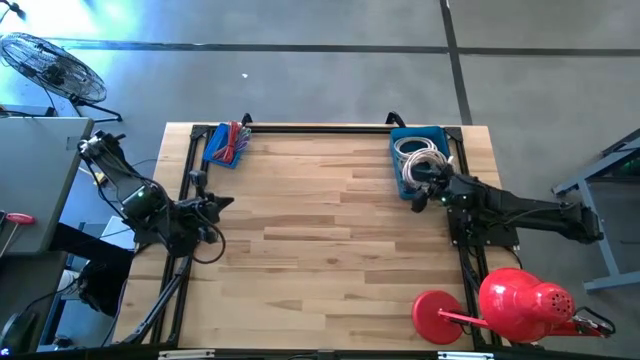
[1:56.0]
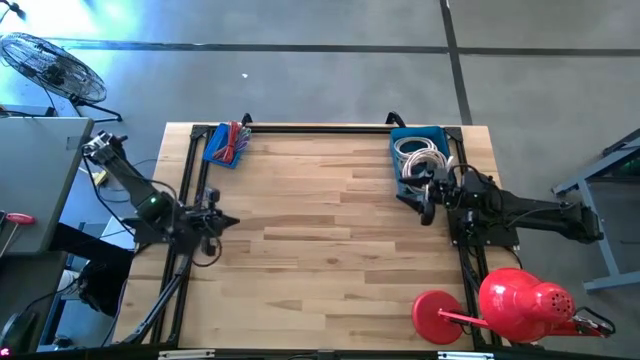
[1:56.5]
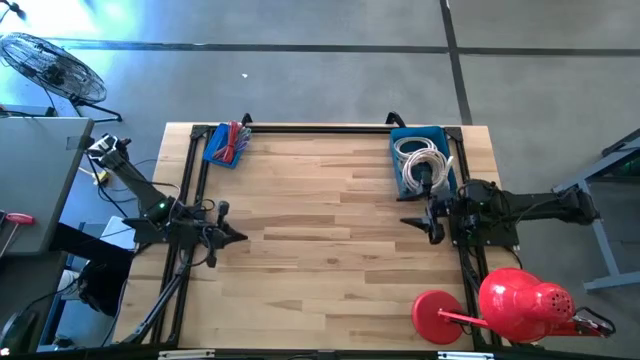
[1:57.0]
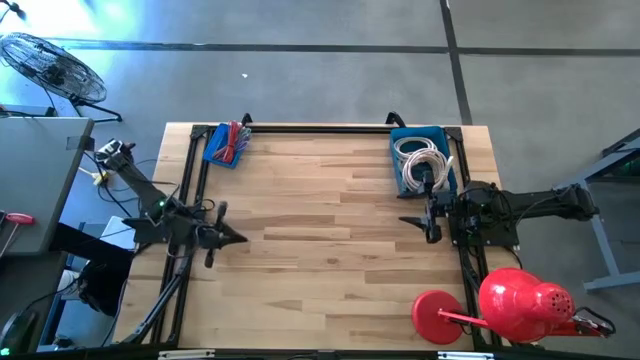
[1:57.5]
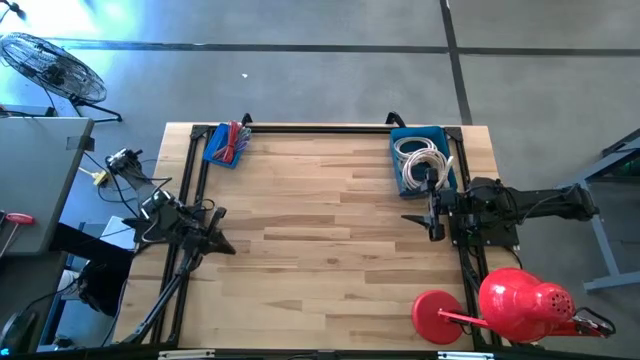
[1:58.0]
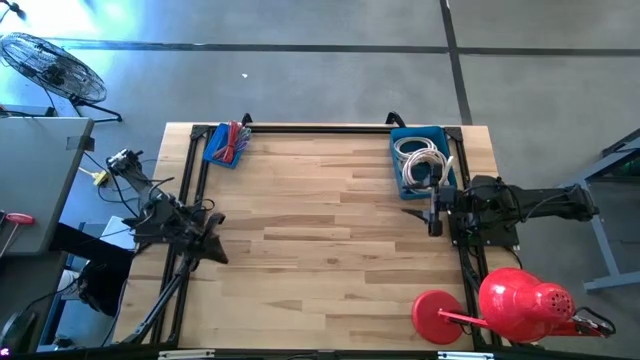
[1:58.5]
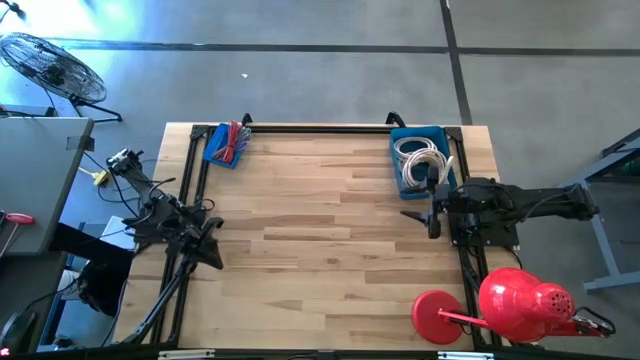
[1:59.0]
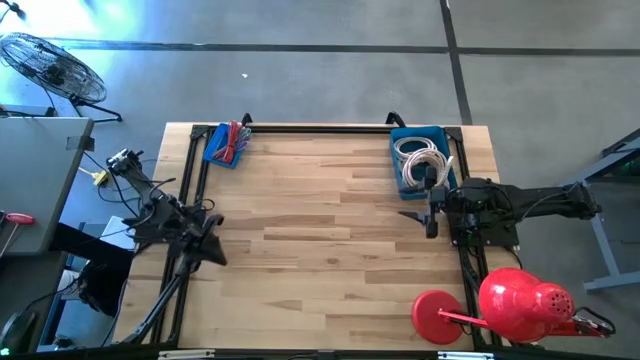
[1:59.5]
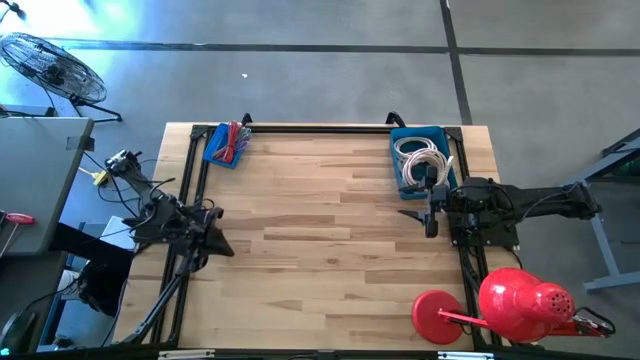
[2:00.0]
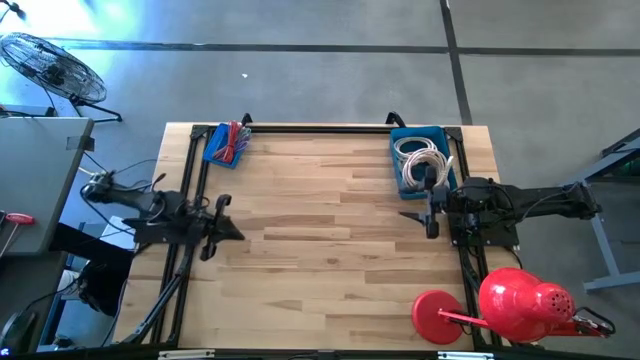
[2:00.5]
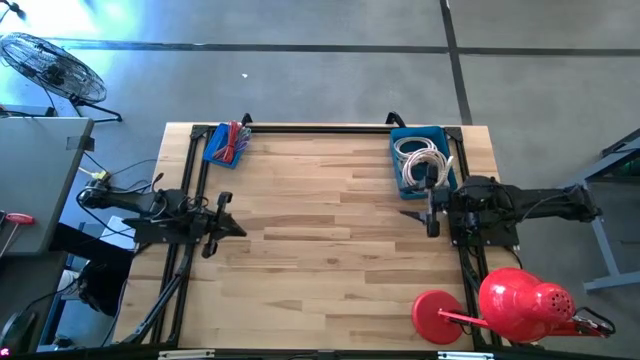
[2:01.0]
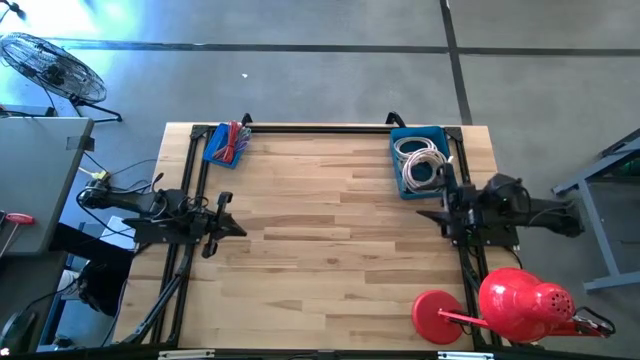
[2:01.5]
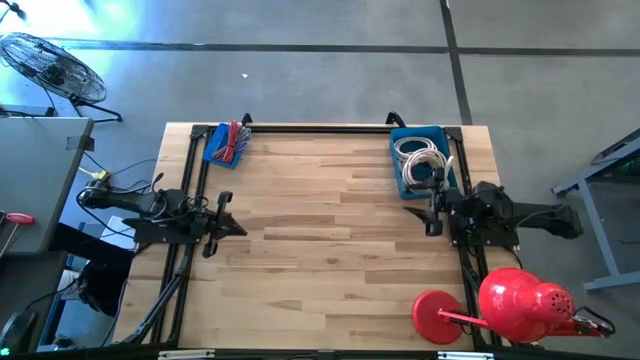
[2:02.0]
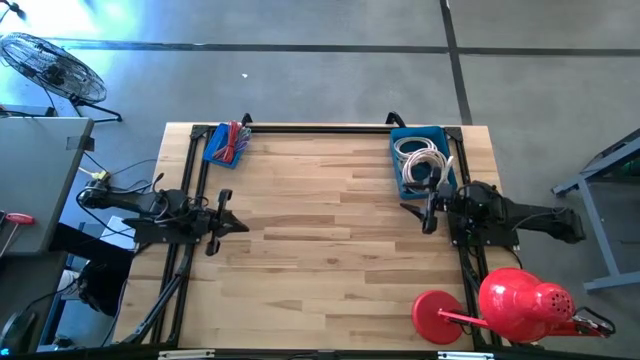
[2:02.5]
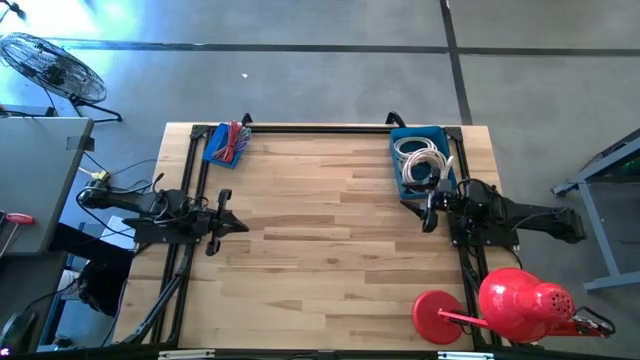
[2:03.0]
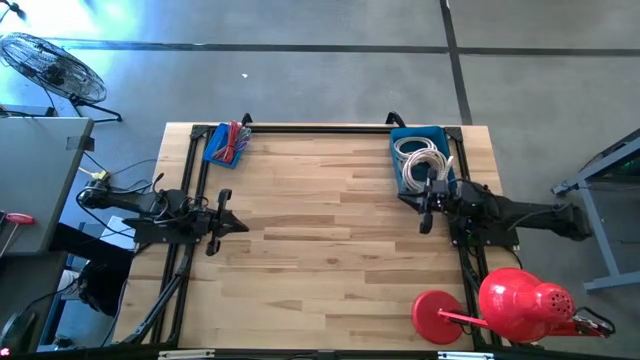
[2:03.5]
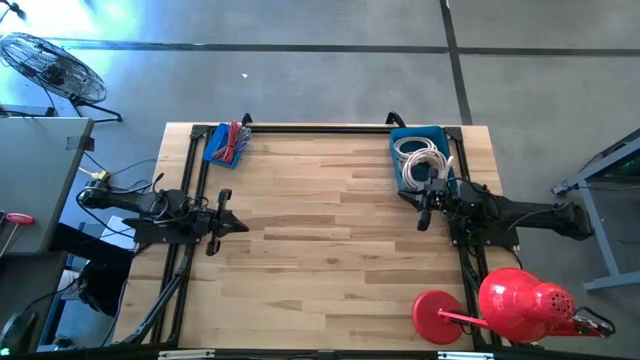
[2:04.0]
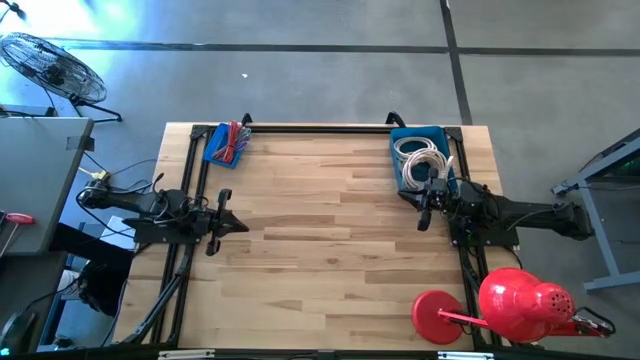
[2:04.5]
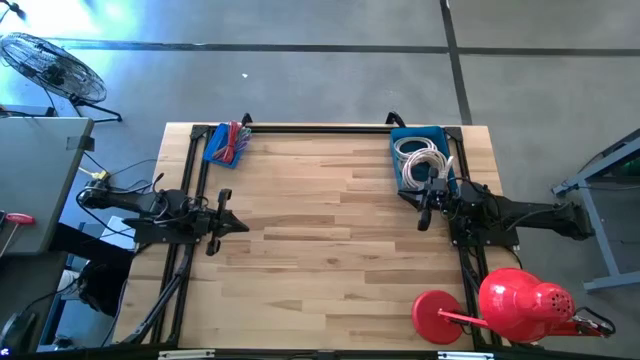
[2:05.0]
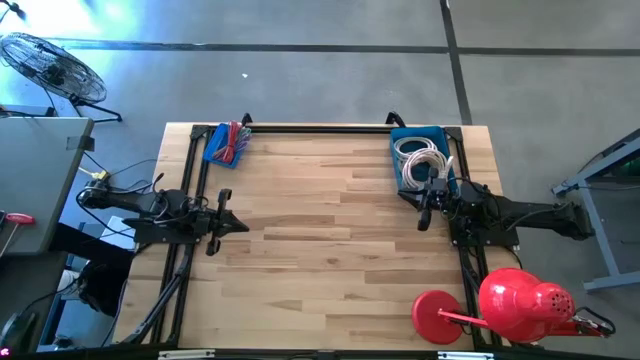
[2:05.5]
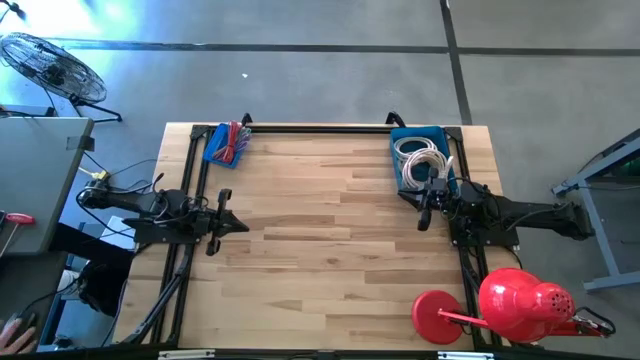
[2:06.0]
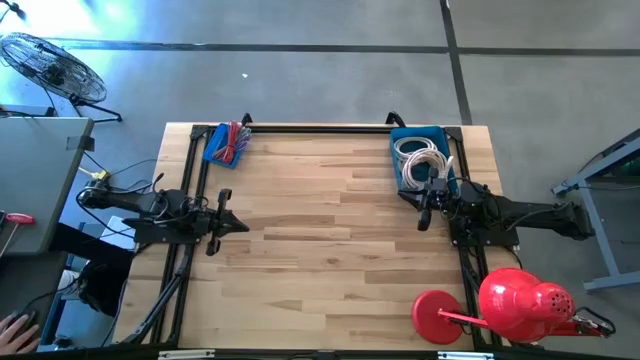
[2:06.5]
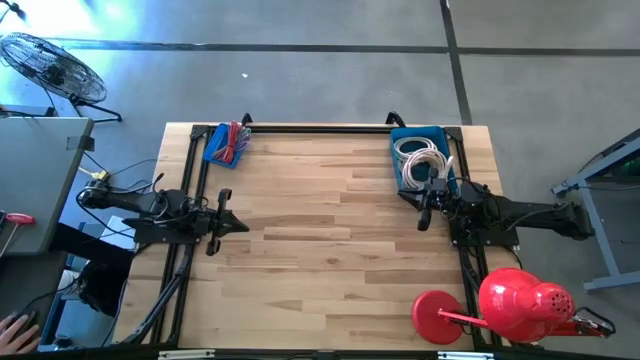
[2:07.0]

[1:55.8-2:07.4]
Task: Pick & Place USB Port
Return to Home Position

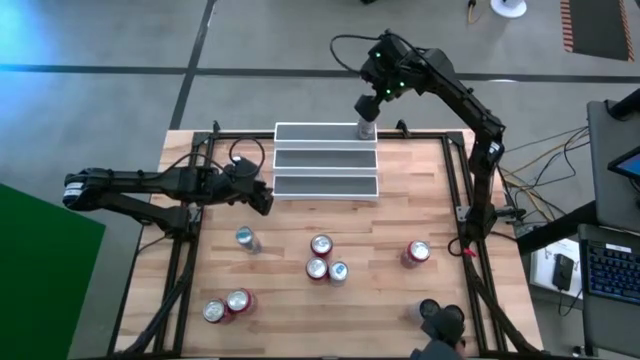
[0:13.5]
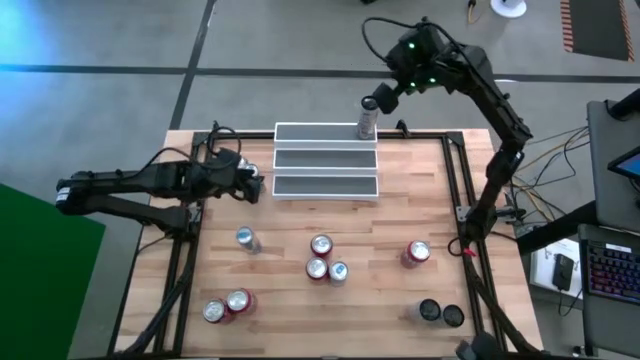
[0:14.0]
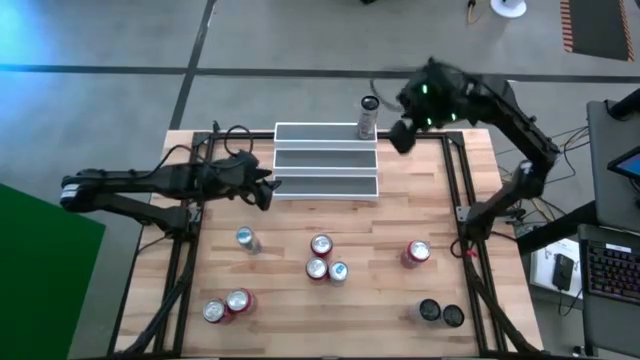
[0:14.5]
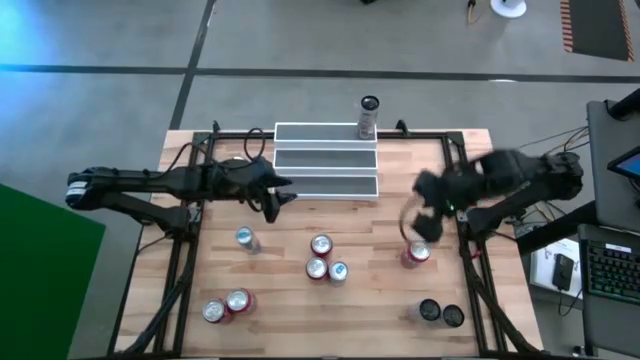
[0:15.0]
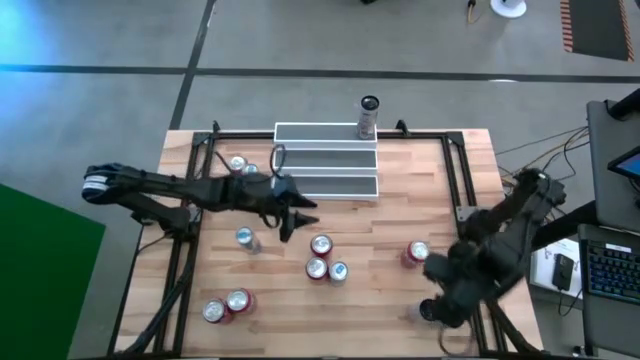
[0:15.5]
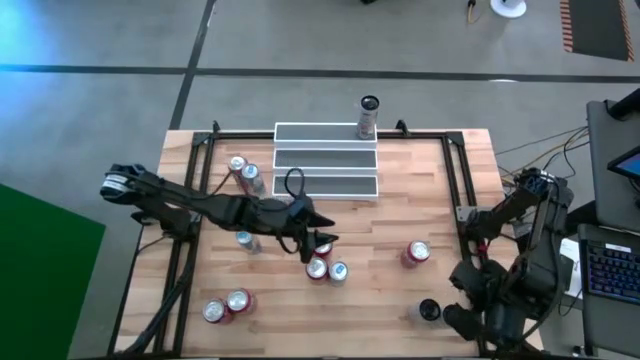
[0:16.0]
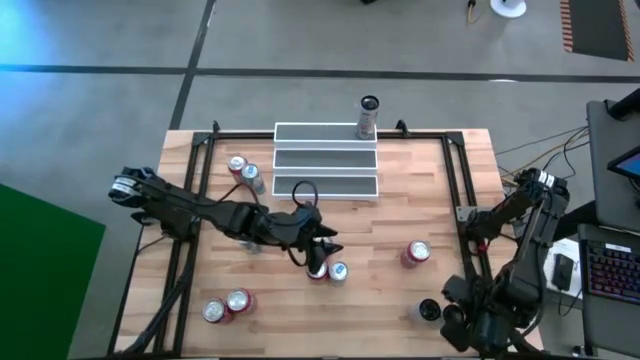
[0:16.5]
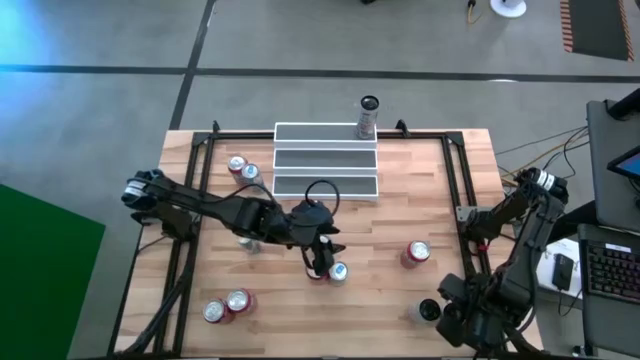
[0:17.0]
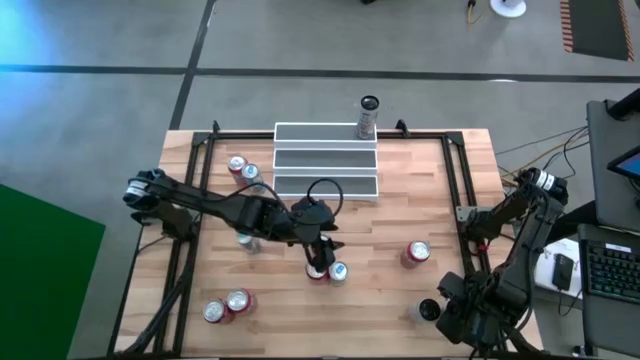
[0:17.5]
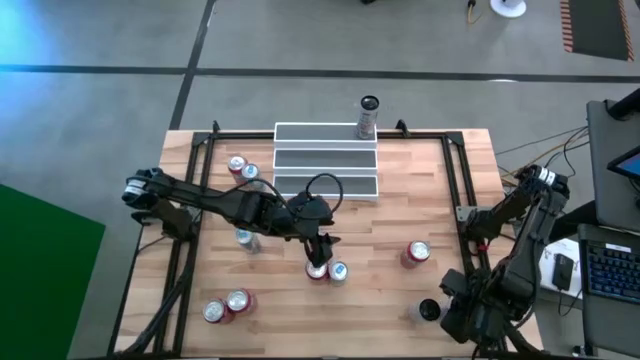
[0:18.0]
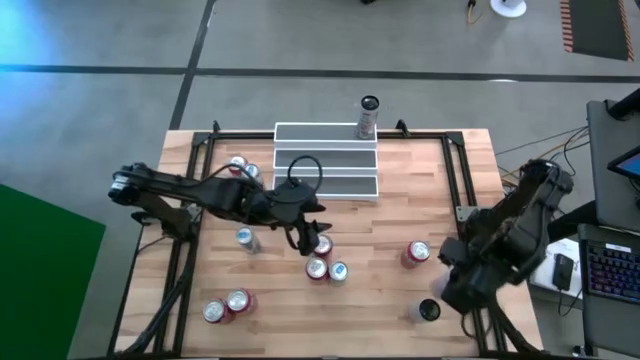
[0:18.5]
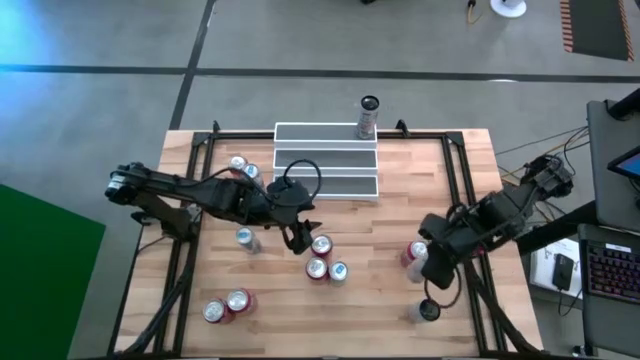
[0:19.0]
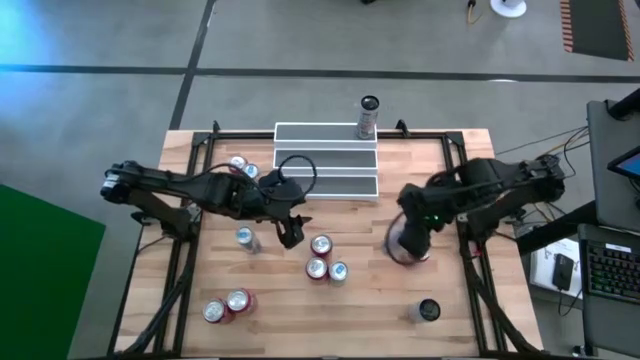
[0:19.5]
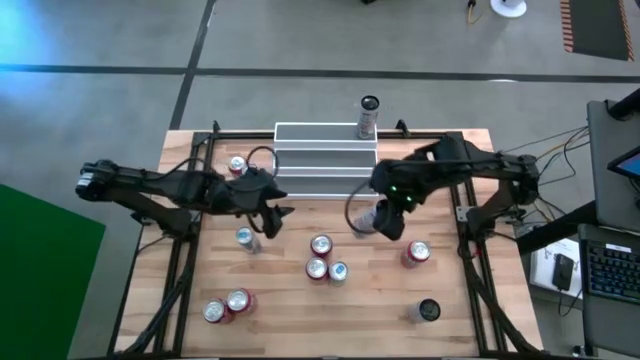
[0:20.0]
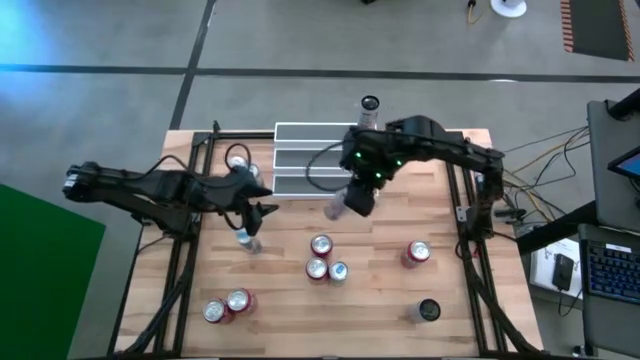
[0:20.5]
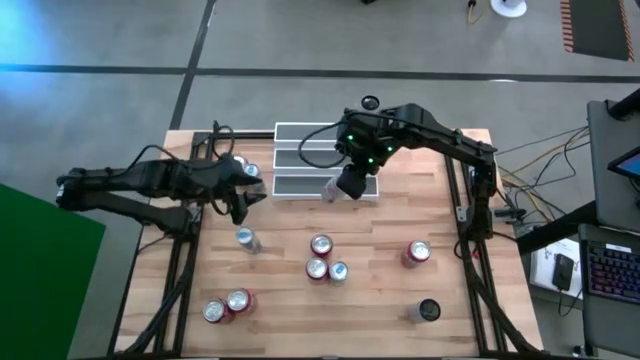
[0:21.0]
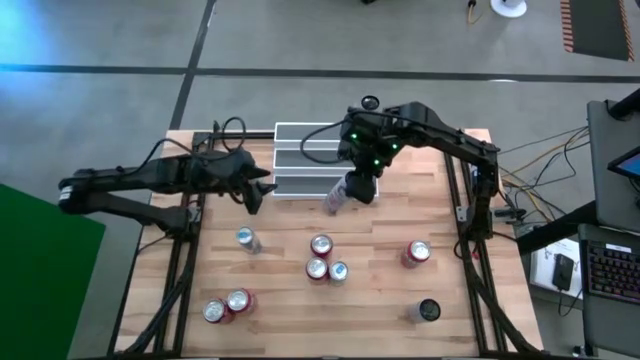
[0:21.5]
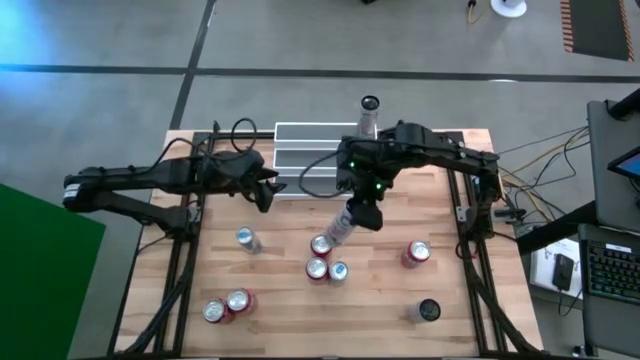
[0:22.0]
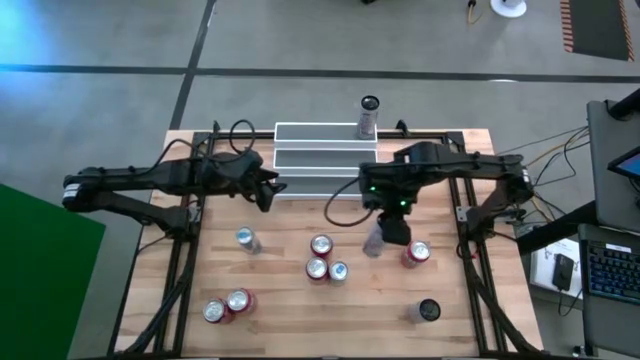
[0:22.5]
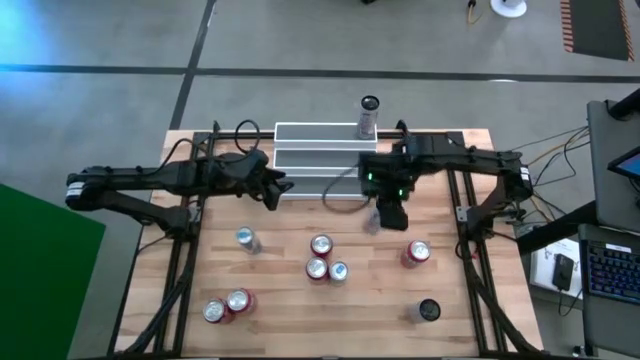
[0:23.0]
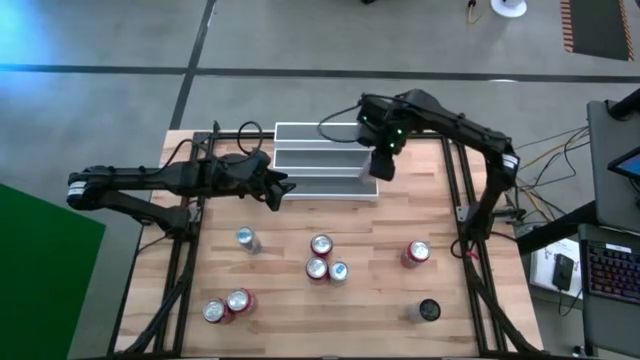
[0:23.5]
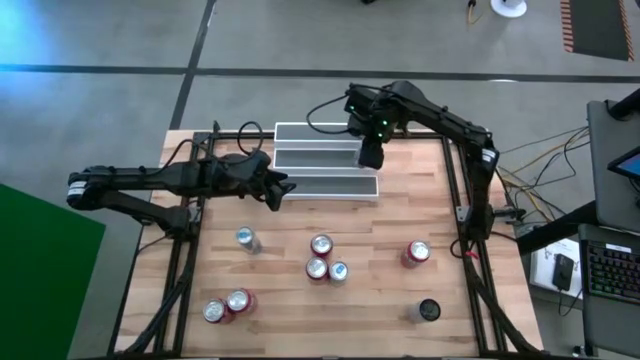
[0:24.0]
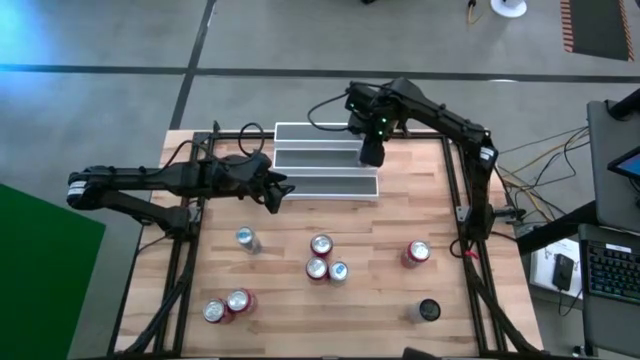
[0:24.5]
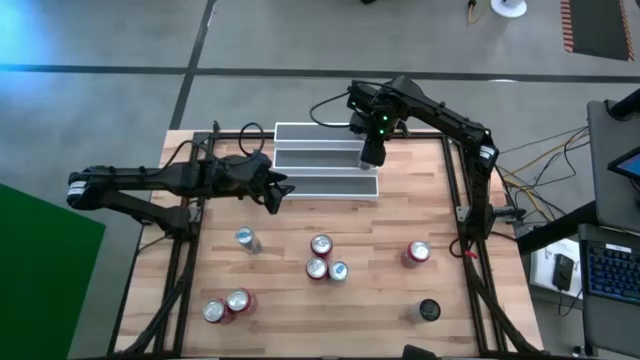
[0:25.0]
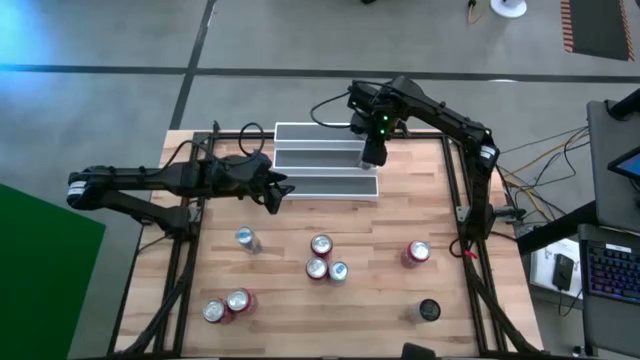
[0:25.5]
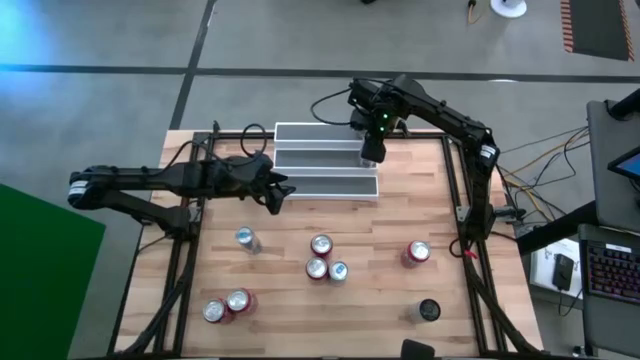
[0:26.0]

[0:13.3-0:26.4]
Task: Place canned beverage on shelf
Put the right white soda can on the middle tier of the shelf aligned with the other white soda can
